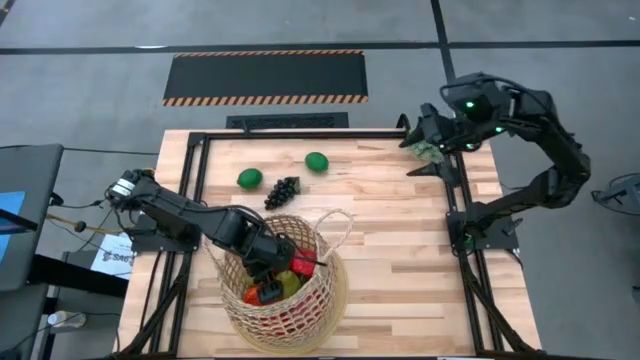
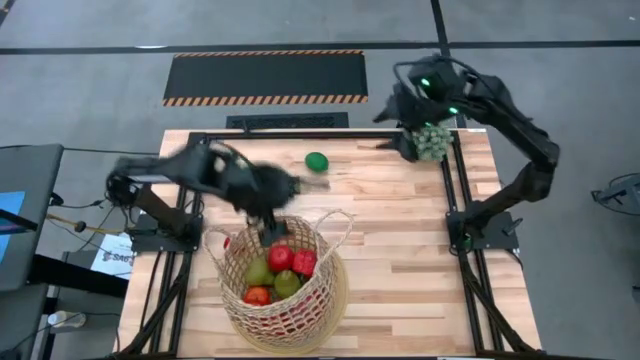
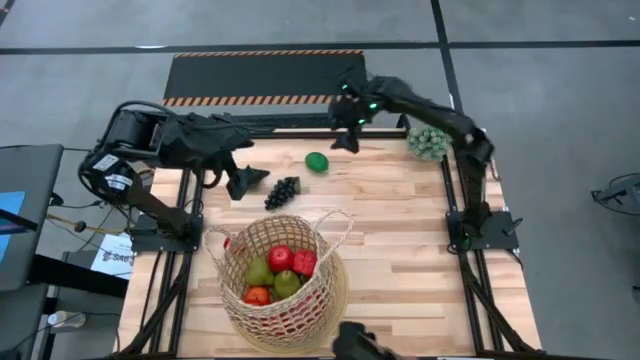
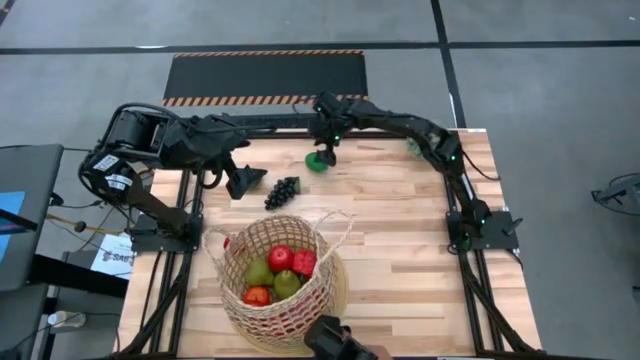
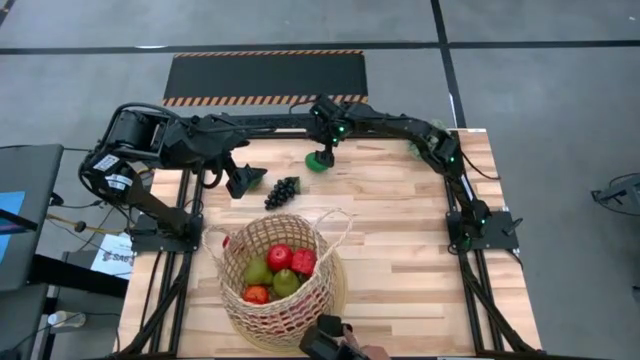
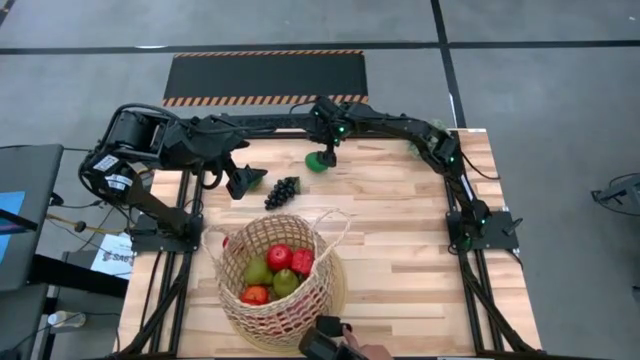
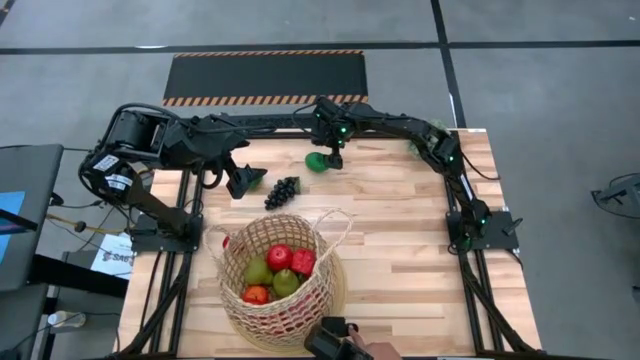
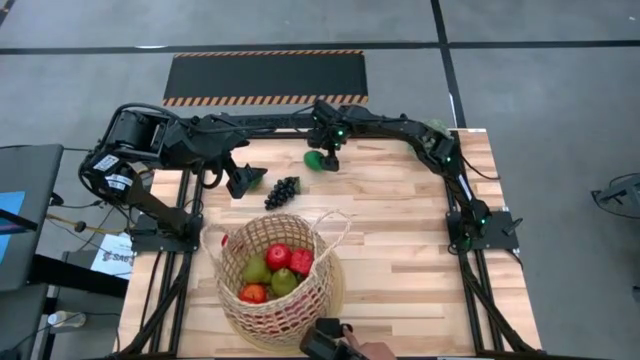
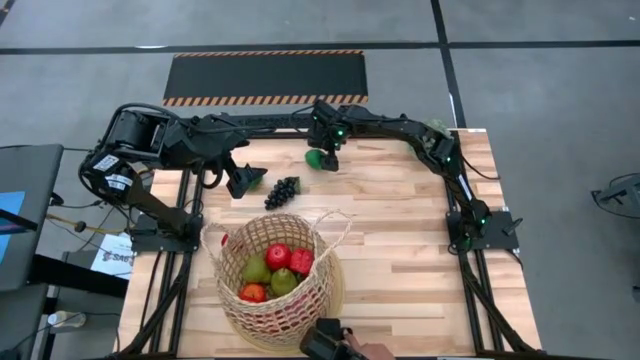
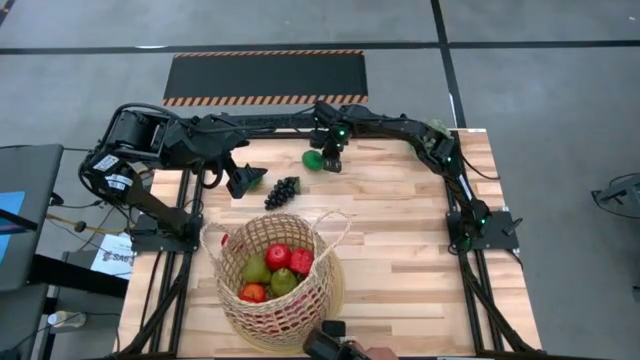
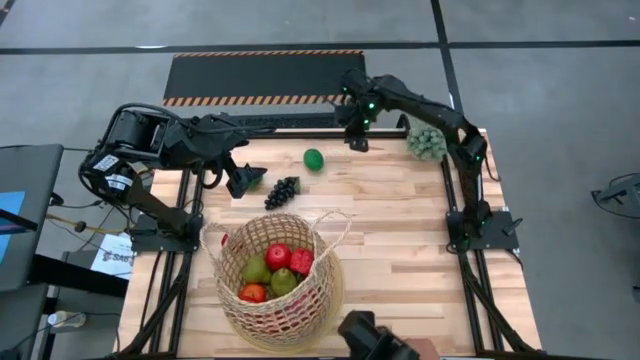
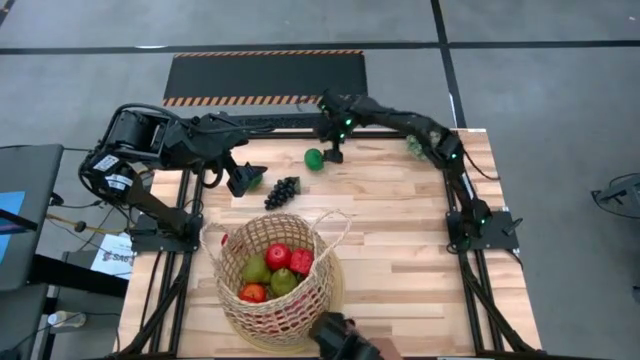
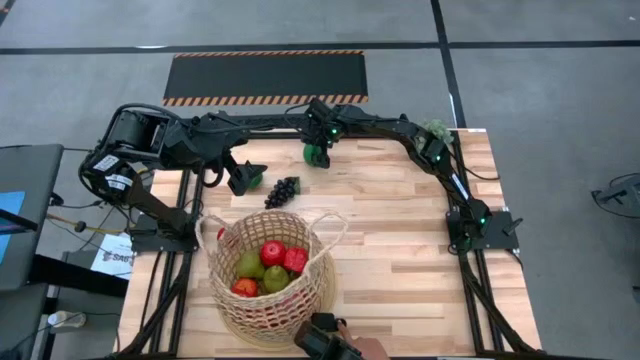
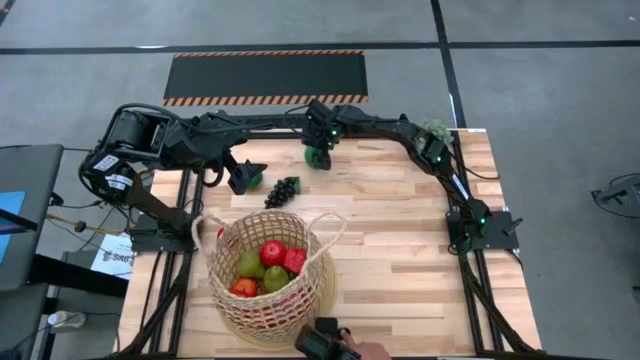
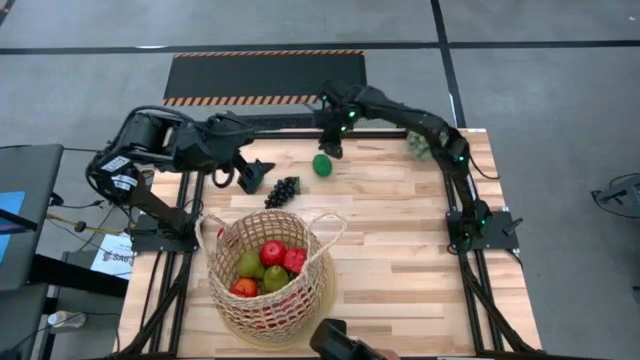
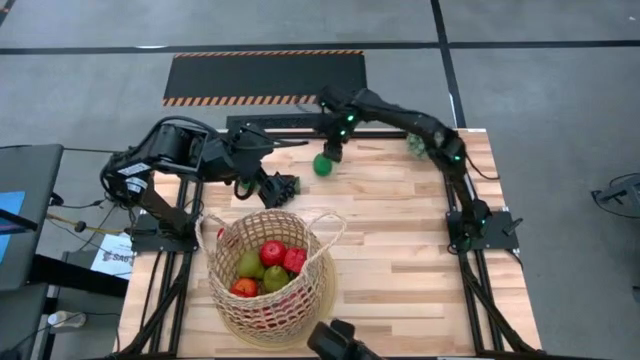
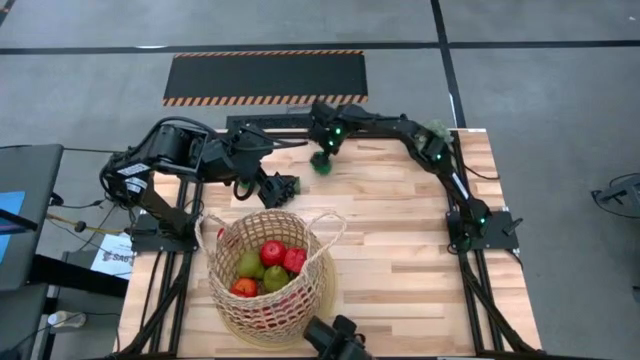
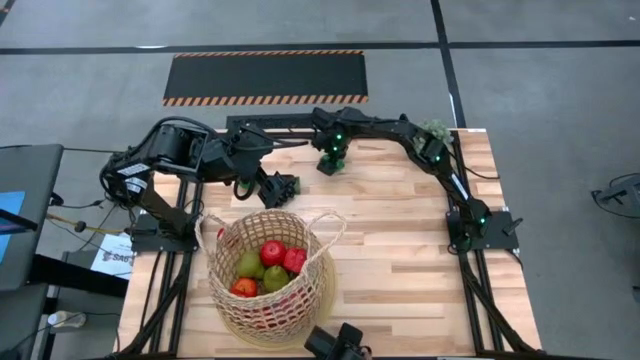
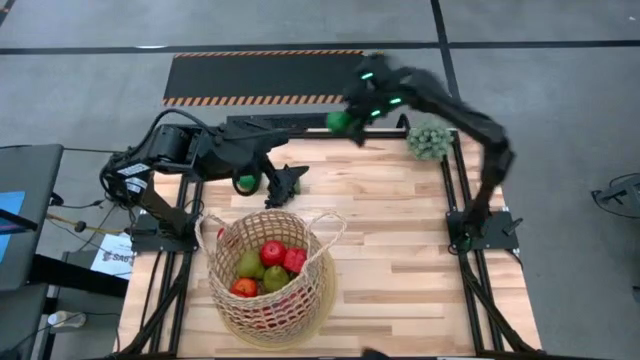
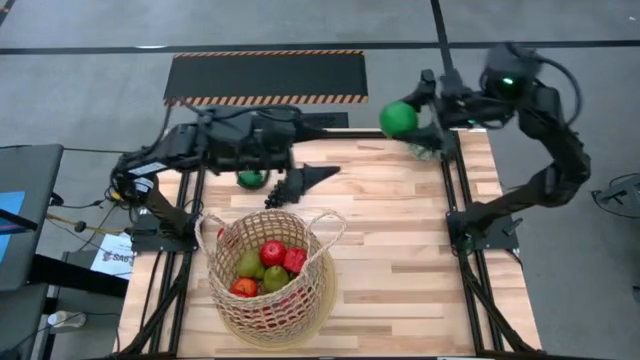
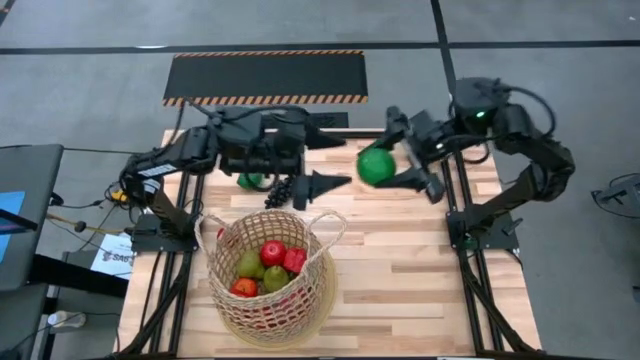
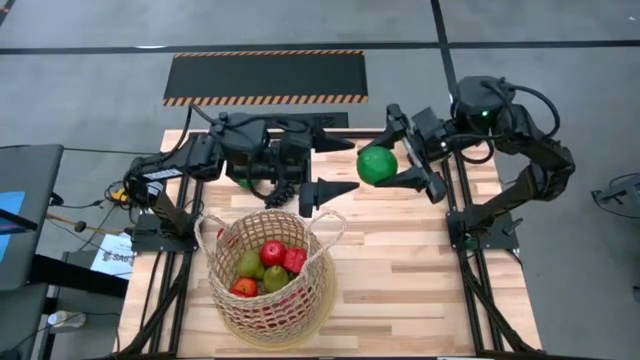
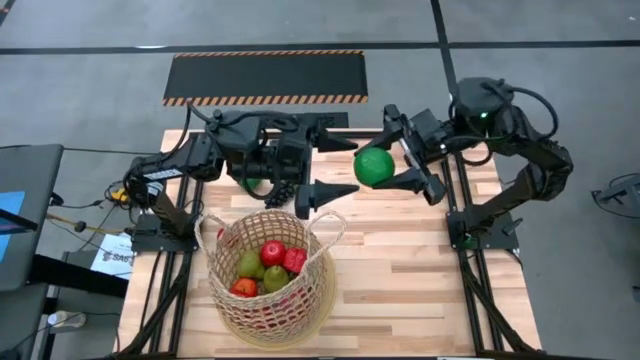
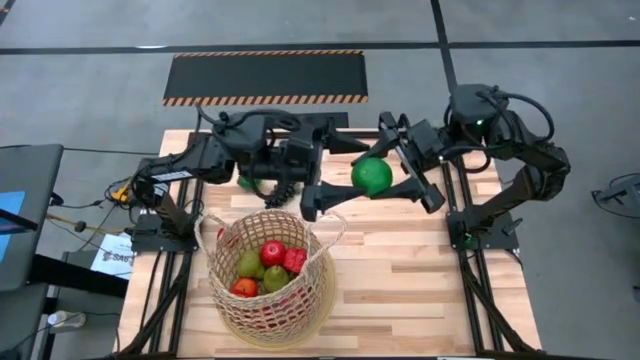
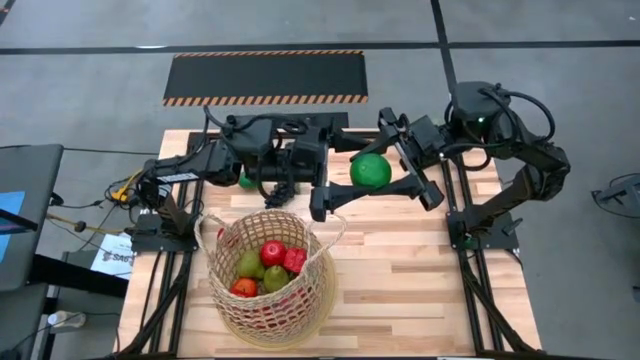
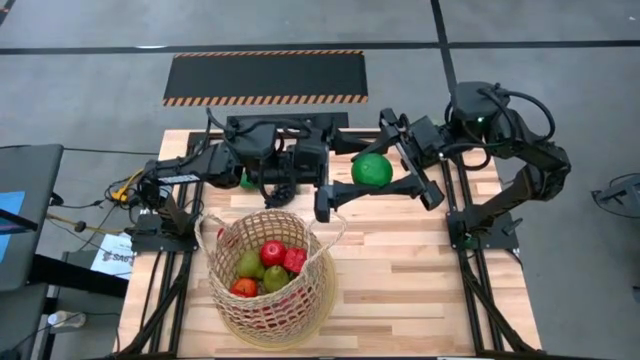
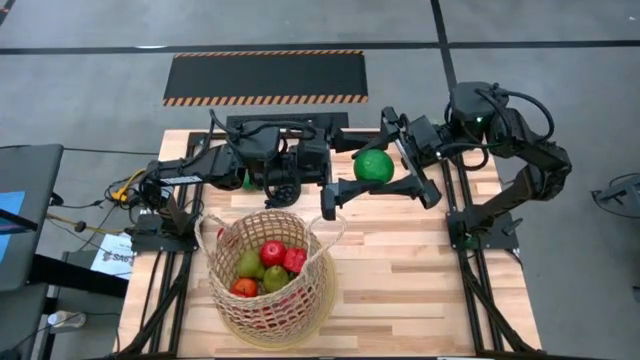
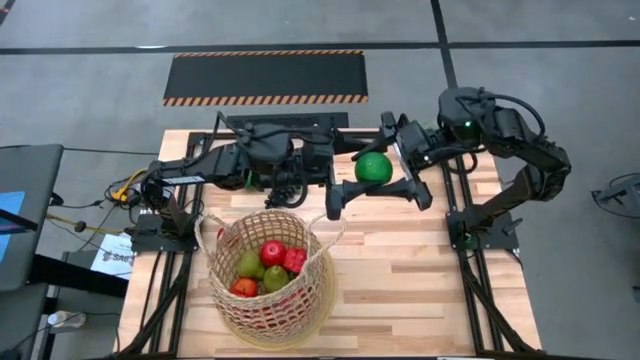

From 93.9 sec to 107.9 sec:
Task: Build produce basket
Put the lime into the basket

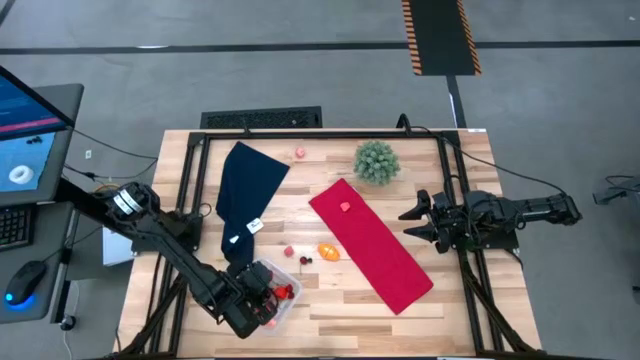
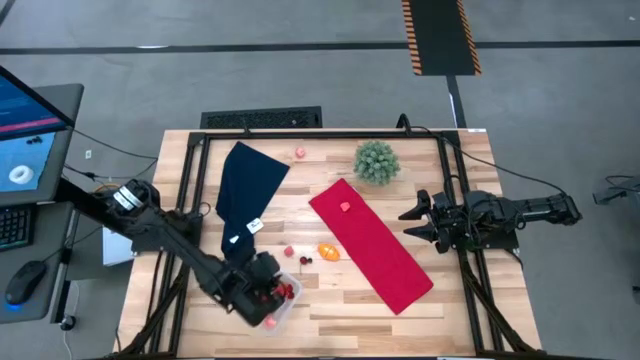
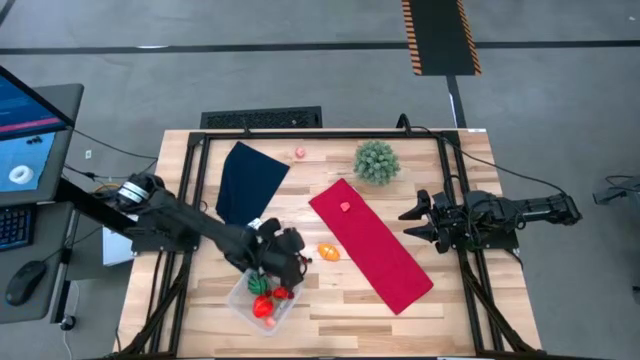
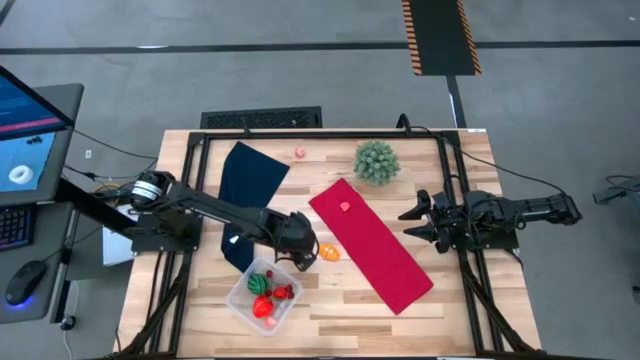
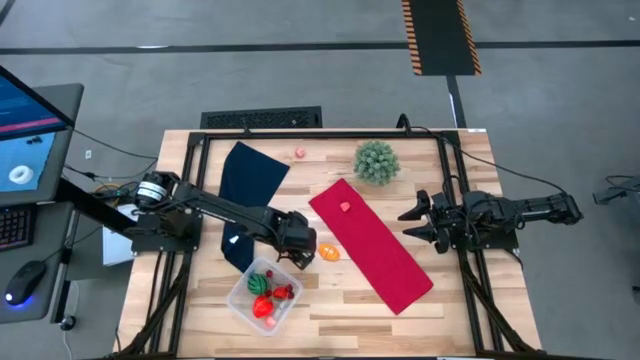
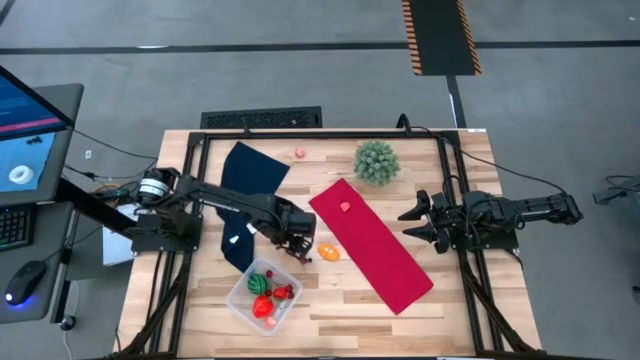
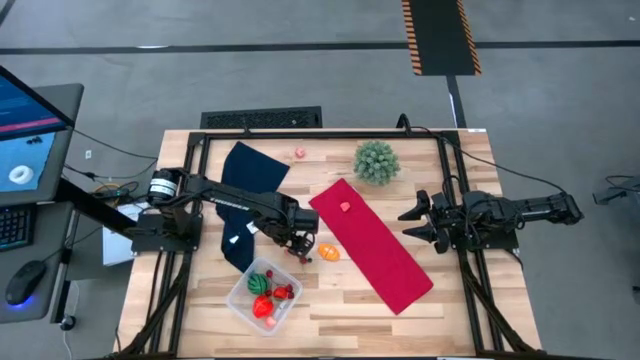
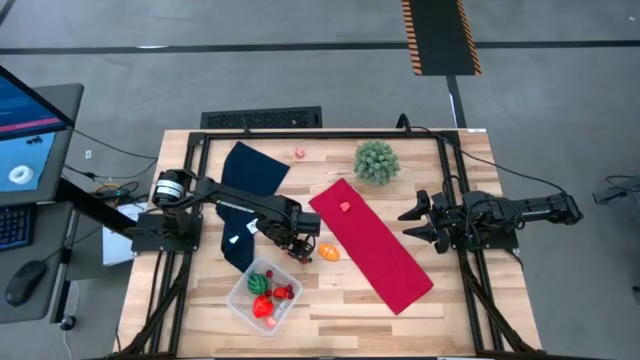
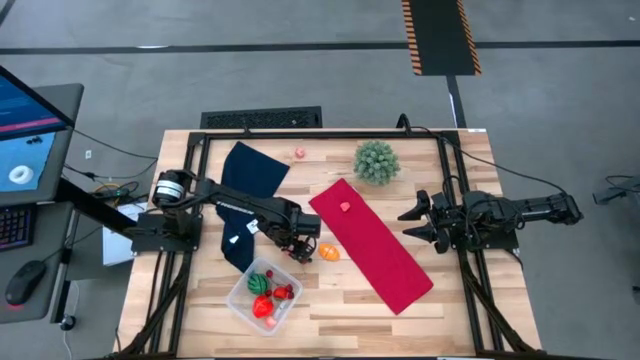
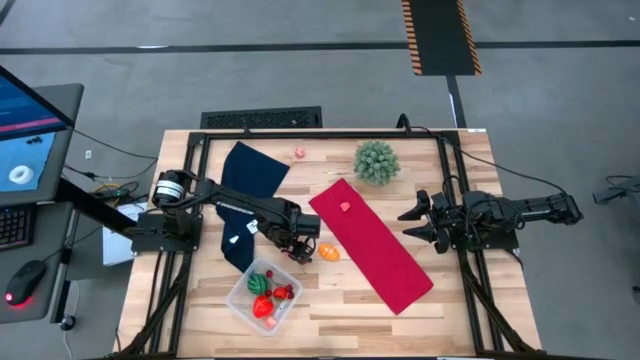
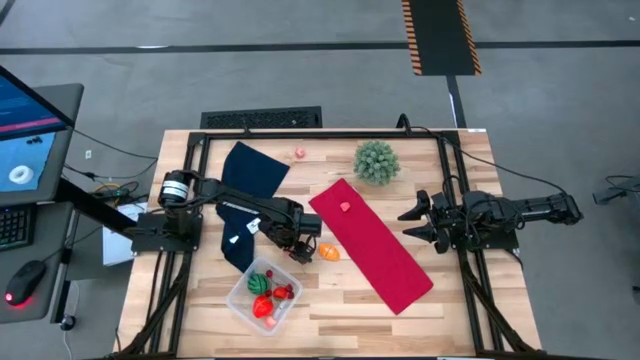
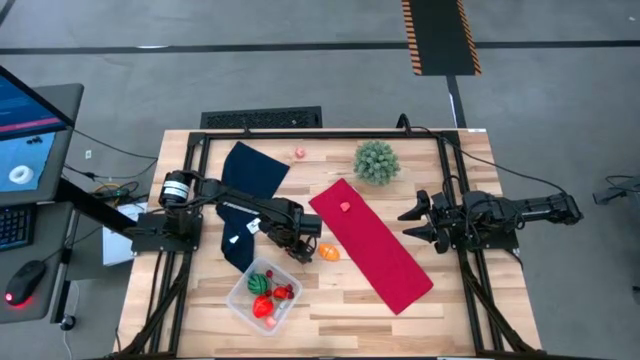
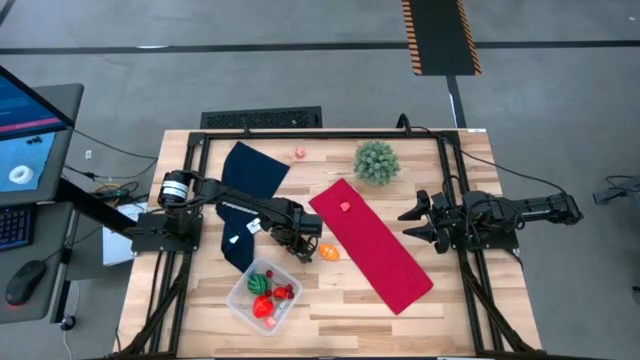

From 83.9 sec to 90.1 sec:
Task: Pick and placing Produce into tupperware
Put the peach fruit into the transparent bin

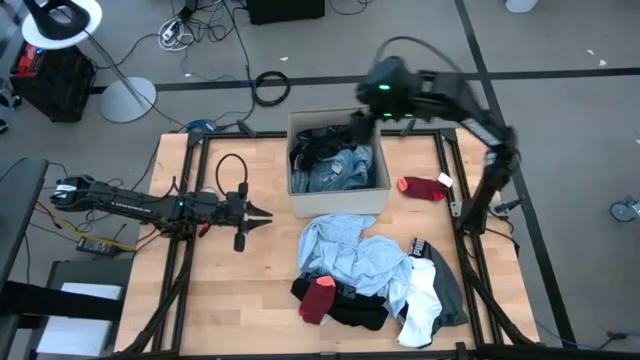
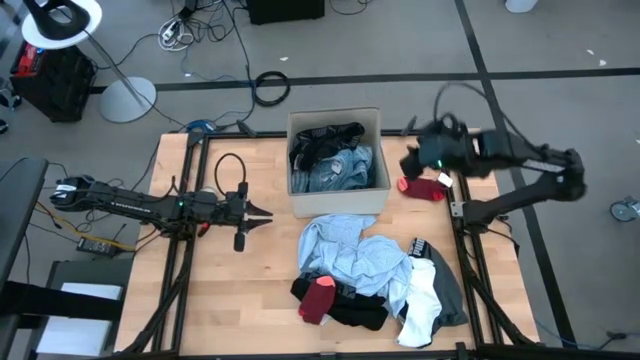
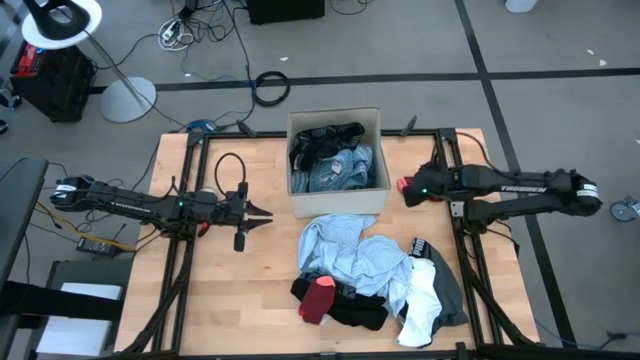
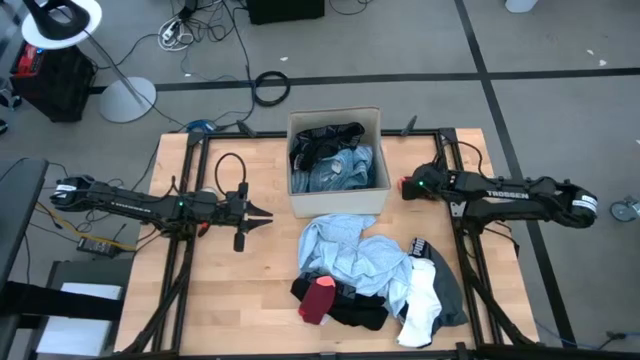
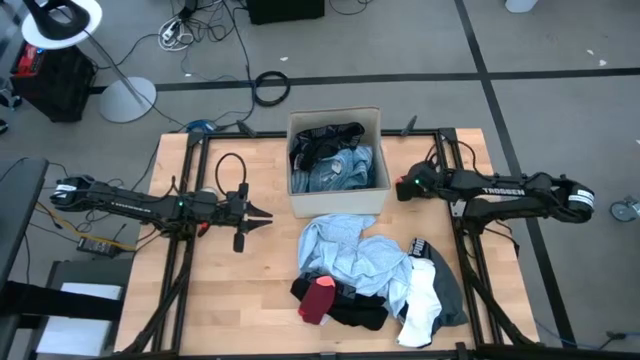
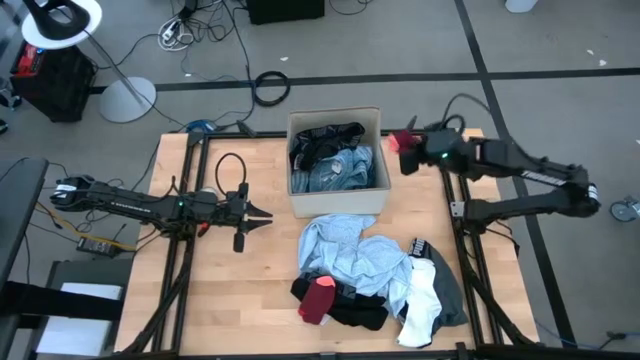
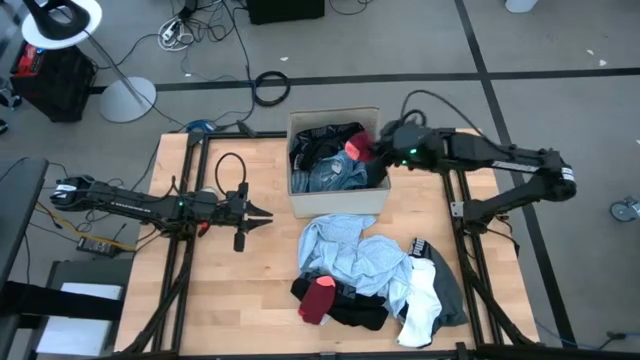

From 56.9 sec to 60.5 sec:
Task: Sort clothes
Put the top red sock into the white laundry bin
